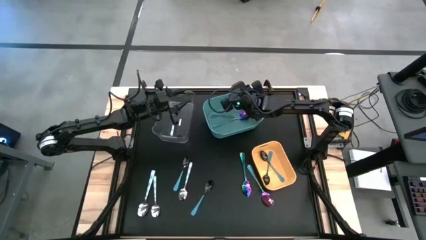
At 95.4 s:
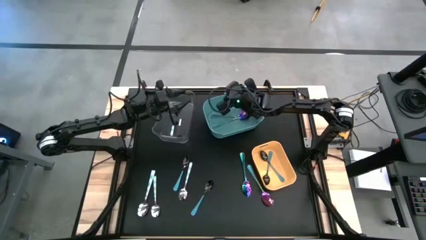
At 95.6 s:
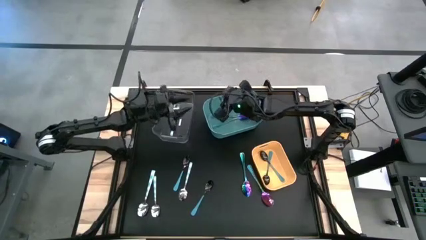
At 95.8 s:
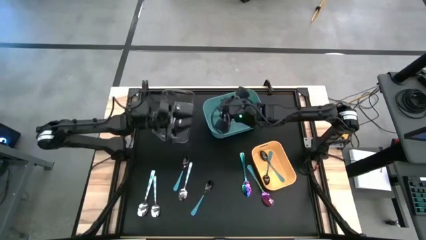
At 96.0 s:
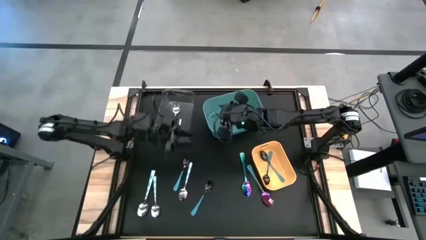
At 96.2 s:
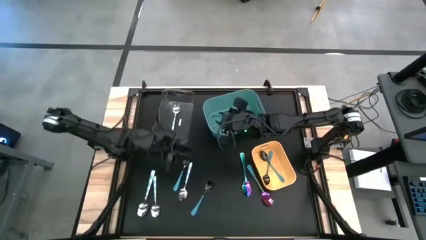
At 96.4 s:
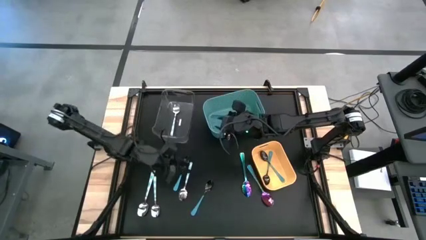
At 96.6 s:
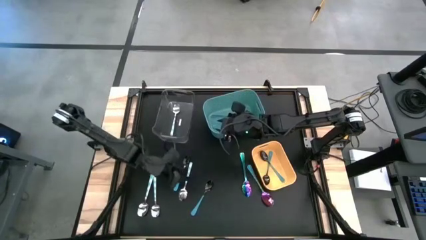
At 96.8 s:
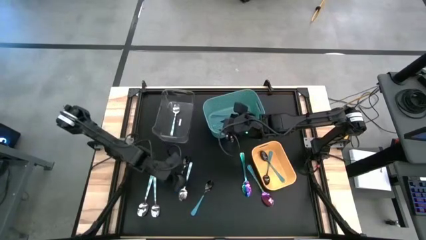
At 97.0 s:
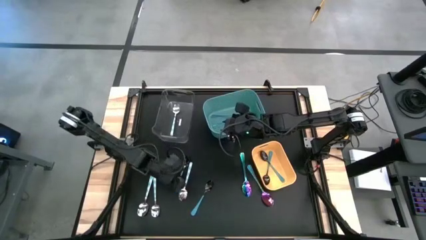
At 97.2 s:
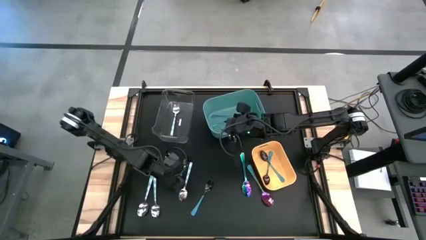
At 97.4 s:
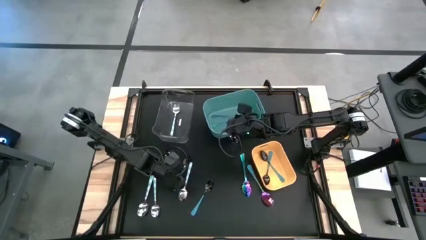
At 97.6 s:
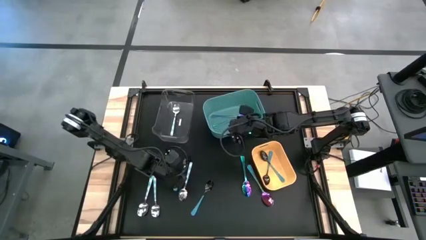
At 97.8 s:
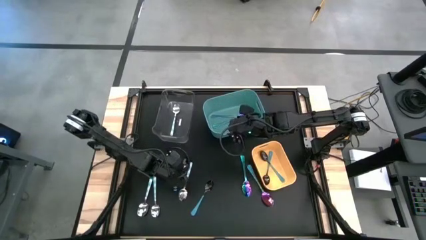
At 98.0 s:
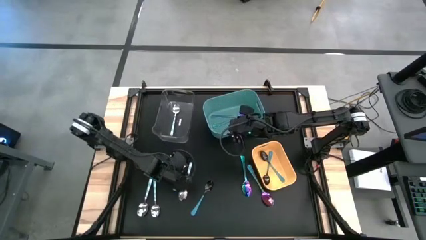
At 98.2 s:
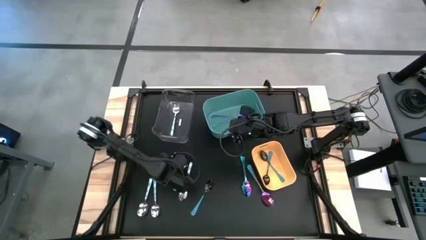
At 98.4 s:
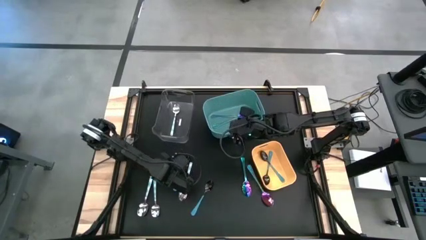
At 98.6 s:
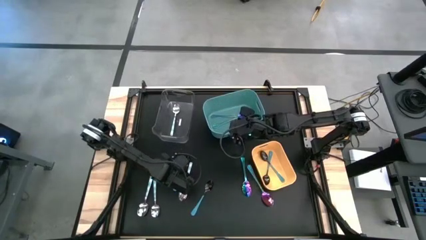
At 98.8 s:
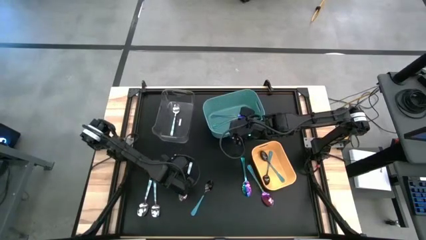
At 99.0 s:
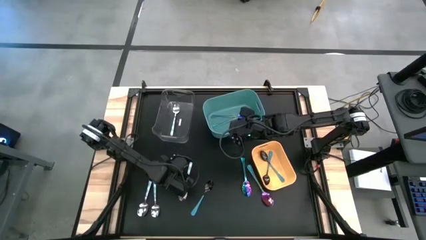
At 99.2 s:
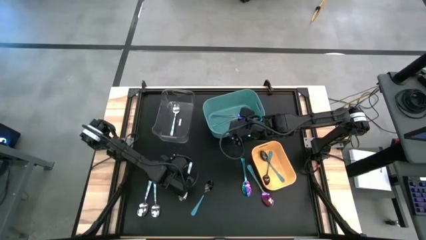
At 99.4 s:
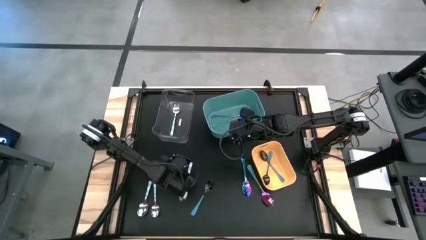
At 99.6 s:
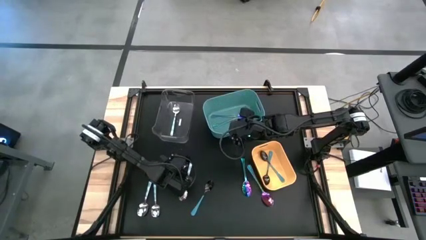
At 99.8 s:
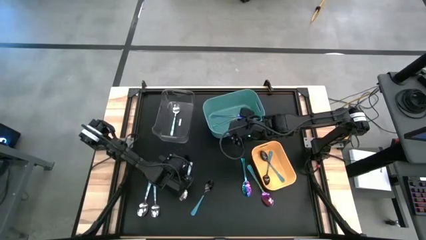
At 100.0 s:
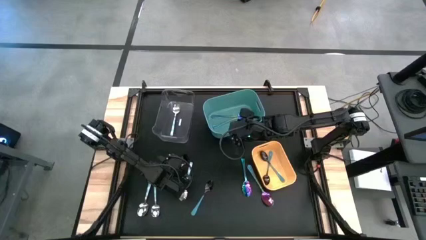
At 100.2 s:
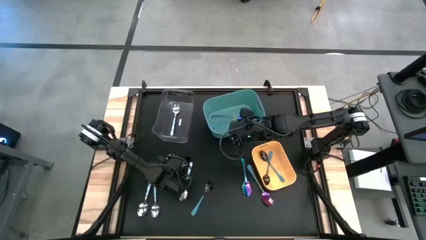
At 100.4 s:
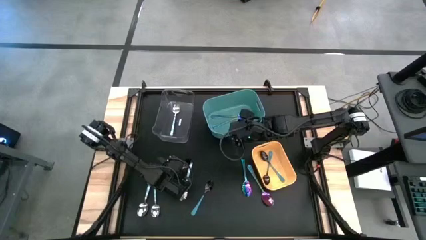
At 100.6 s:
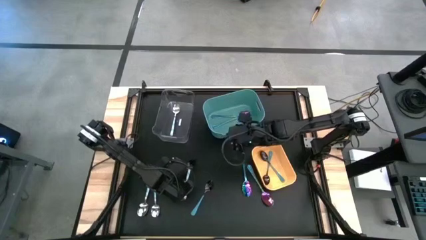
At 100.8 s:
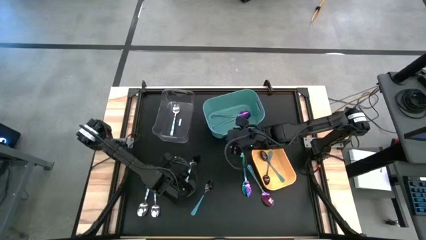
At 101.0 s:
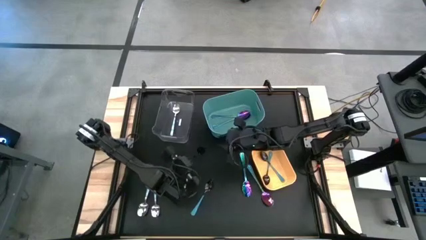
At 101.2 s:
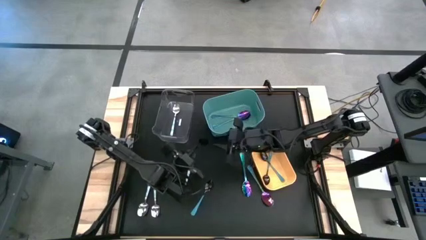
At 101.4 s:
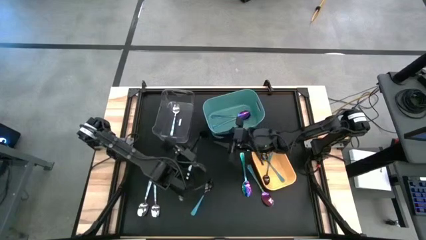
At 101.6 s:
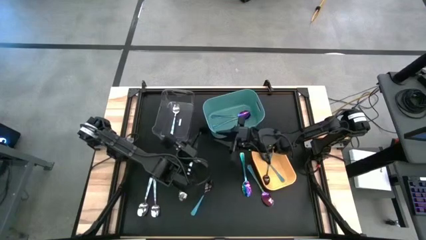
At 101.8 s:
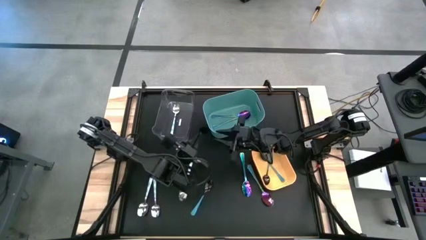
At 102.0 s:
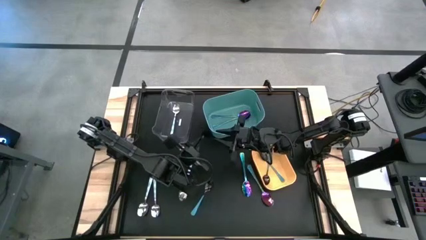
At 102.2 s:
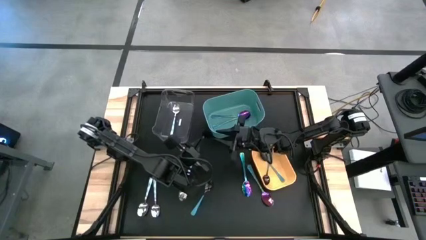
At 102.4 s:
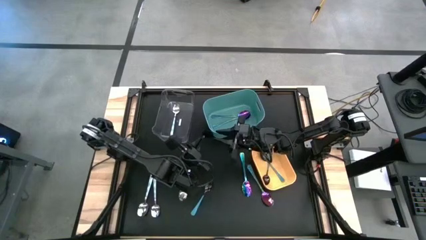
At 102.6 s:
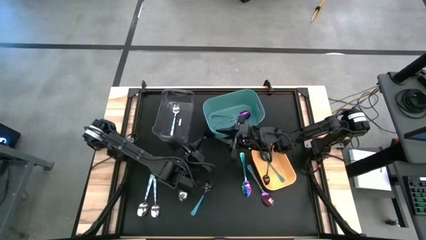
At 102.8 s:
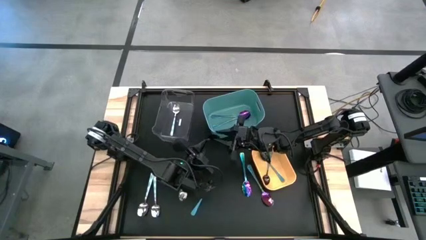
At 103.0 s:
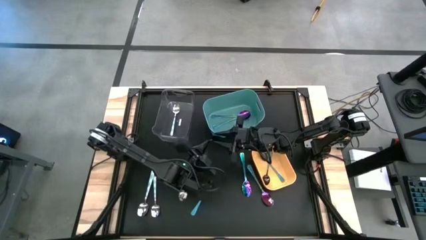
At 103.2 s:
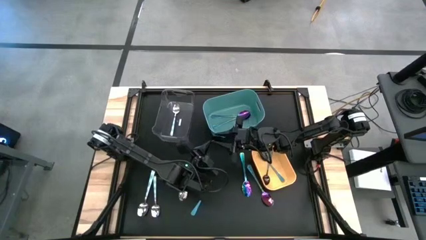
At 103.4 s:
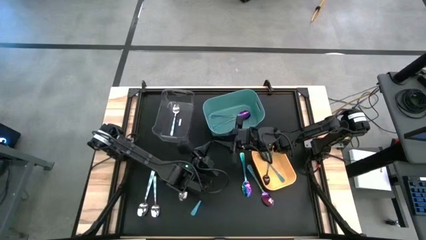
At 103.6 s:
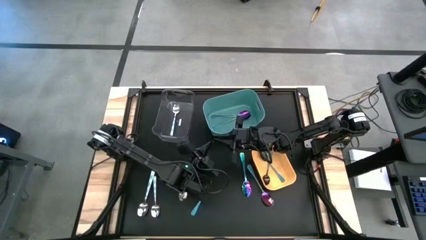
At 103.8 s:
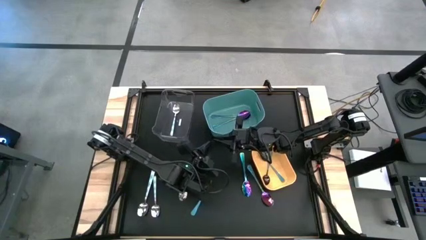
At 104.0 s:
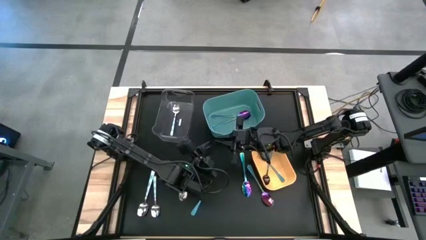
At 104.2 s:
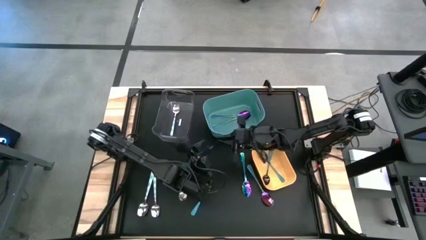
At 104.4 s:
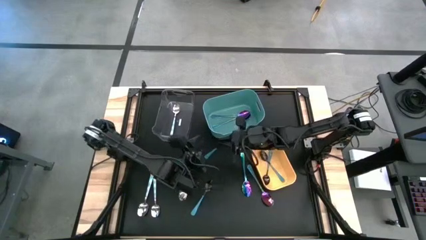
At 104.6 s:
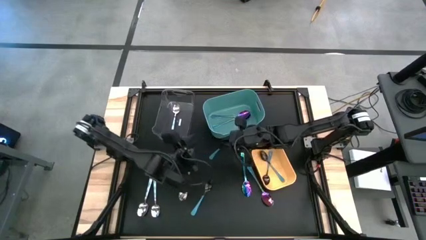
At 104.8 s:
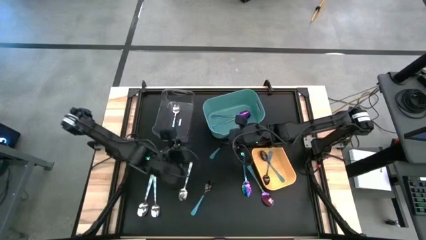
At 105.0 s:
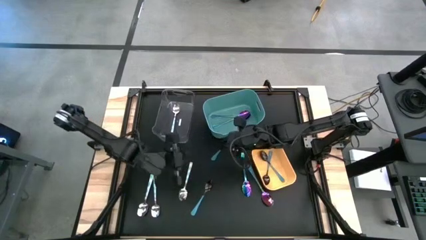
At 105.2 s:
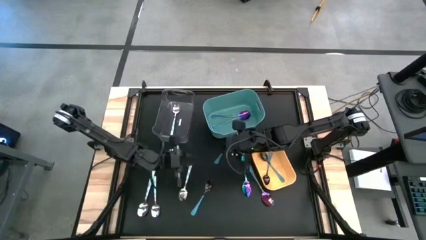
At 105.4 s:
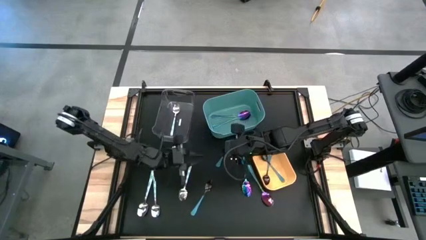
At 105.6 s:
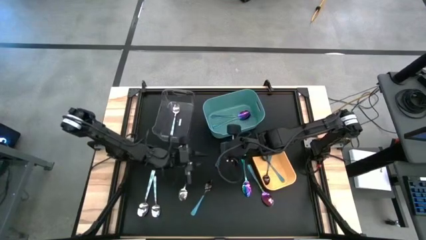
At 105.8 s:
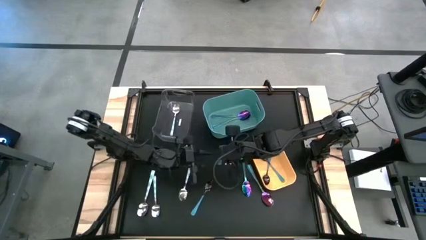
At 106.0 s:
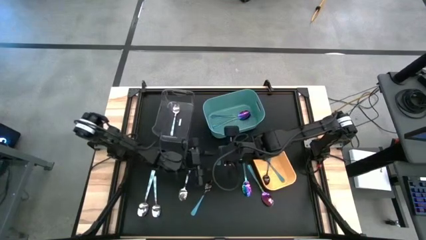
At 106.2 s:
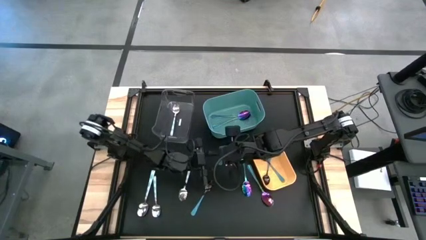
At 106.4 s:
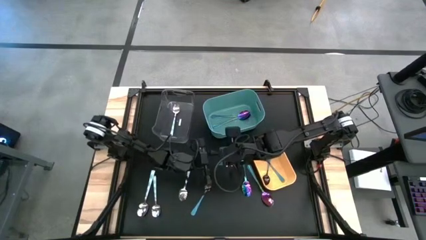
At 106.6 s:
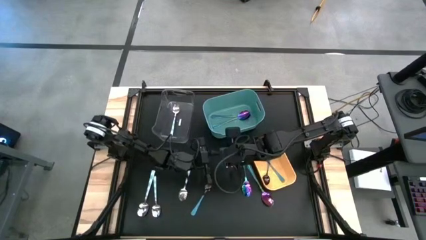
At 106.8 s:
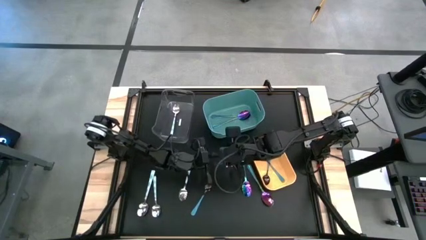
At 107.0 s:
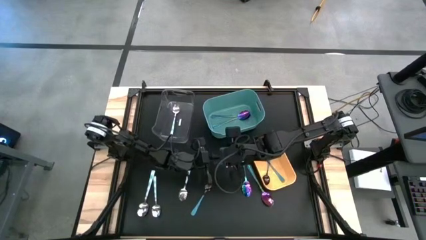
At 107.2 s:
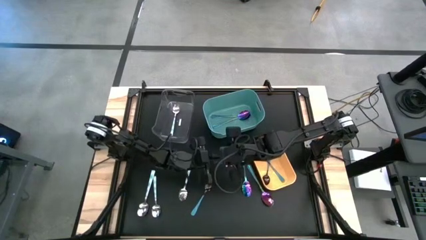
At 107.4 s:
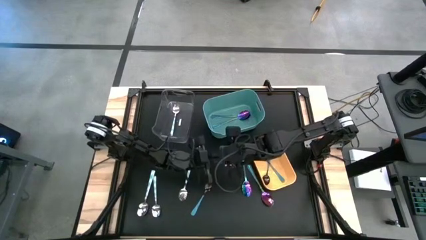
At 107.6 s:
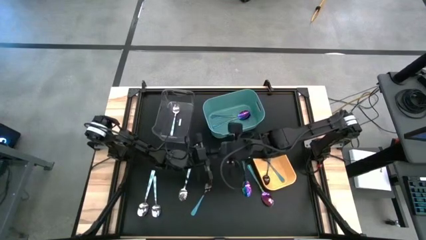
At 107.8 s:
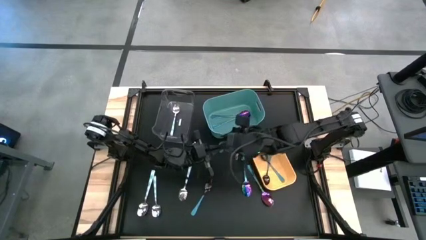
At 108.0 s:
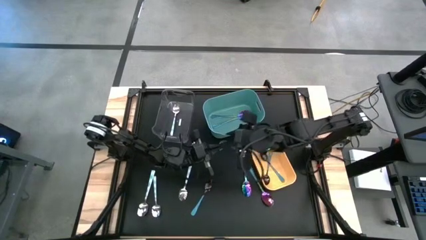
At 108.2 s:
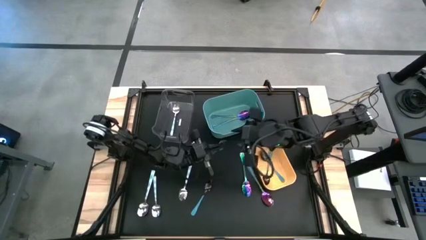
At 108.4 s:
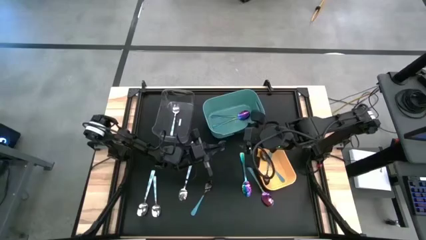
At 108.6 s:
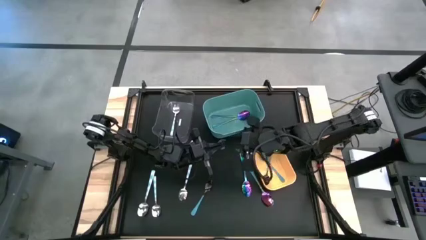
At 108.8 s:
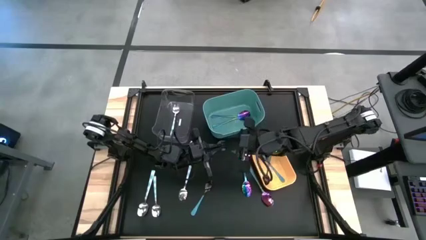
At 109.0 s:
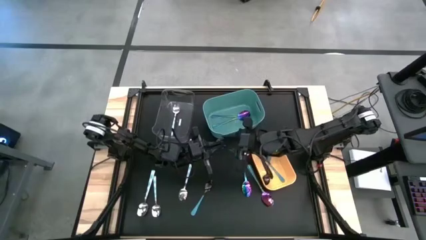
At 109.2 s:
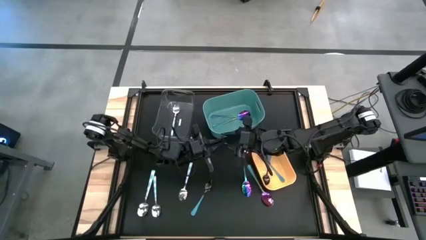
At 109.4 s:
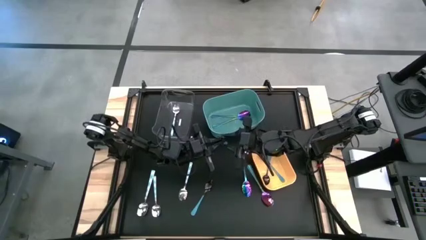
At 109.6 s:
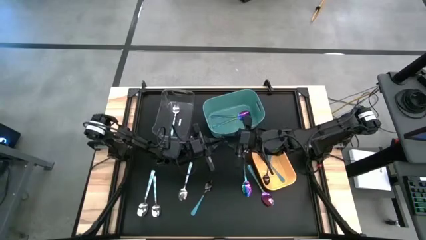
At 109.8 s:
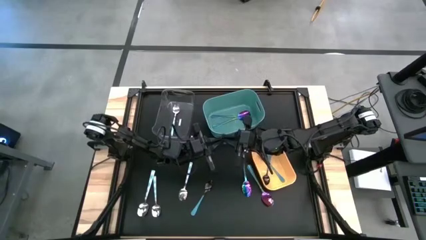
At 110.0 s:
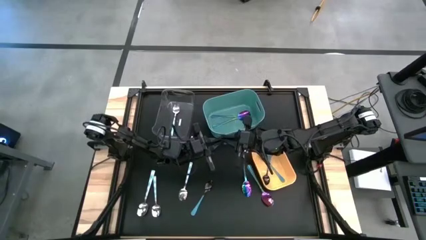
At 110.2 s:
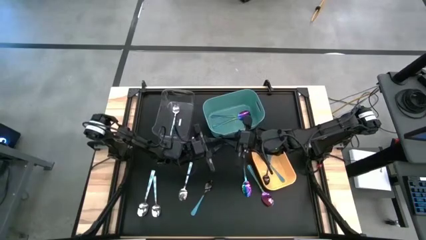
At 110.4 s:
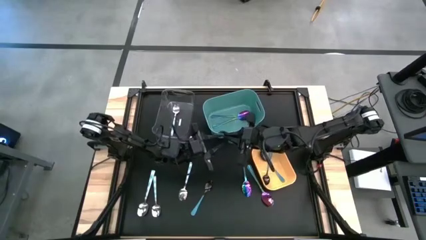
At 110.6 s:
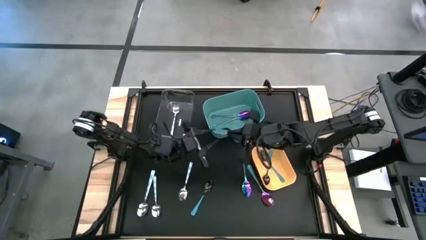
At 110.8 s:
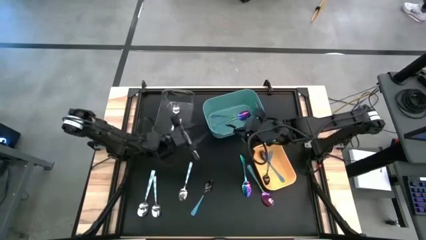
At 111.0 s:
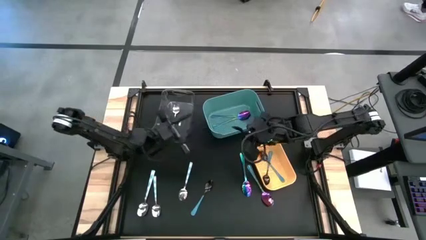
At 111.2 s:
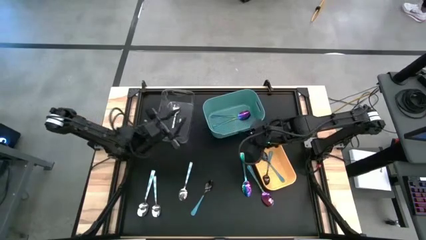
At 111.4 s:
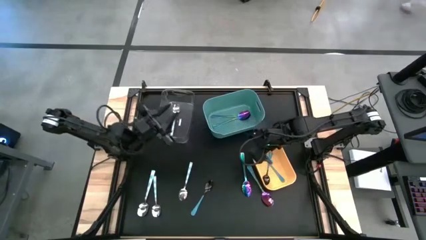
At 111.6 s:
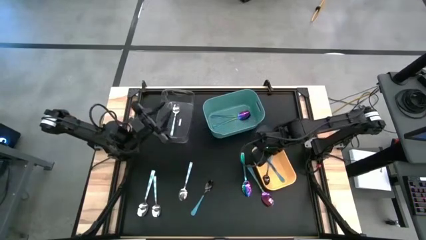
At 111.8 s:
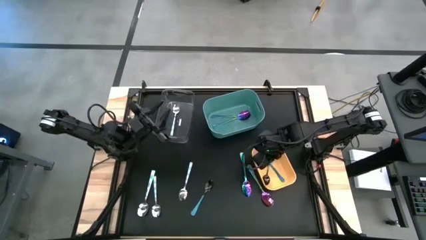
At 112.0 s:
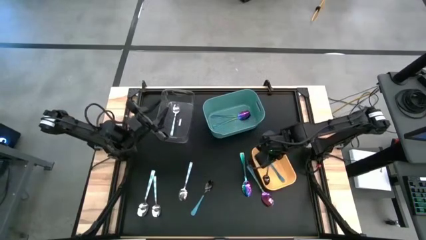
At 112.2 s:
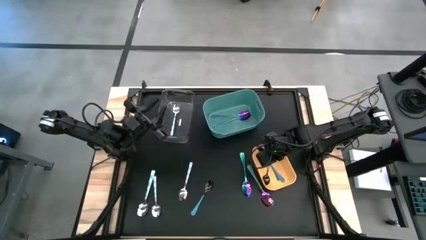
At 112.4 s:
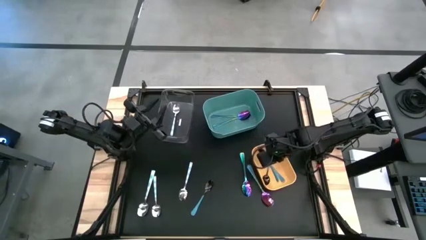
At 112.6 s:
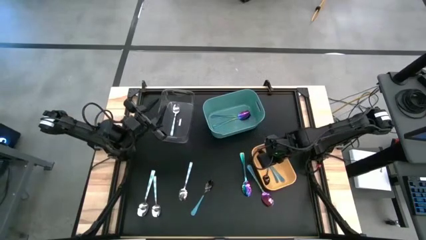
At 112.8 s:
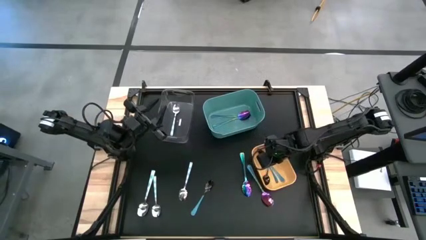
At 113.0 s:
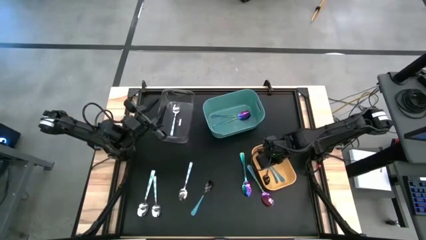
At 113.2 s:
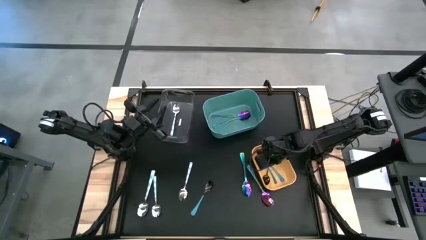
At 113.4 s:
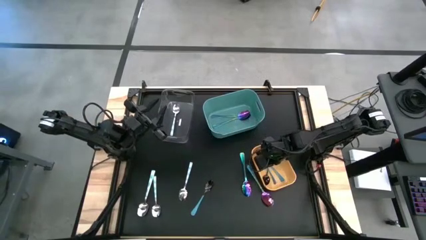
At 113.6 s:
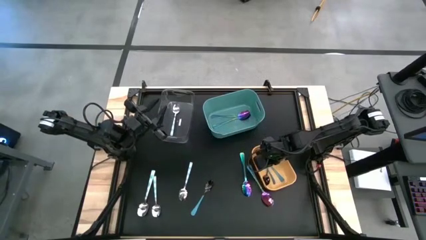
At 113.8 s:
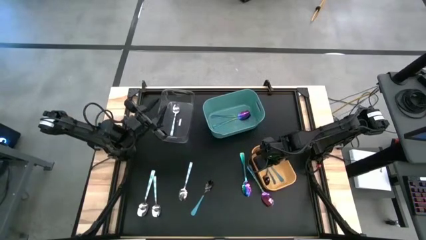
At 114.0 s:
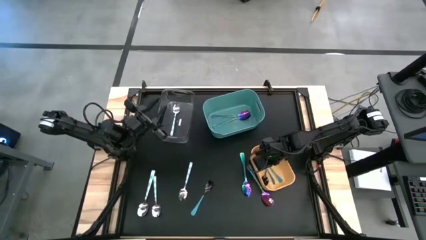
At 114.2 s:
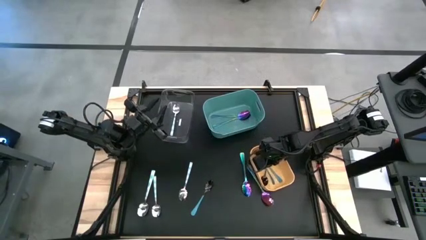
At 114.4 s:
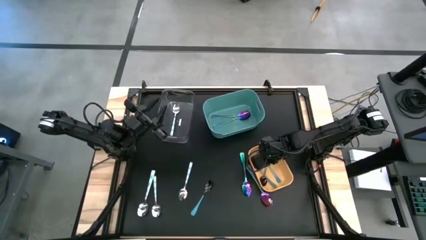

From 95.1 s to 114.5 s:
Task: Sort silverware by color (type)
Put the black spoon into the yellow bin
